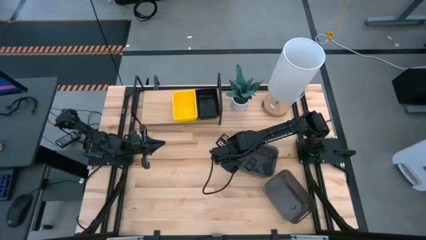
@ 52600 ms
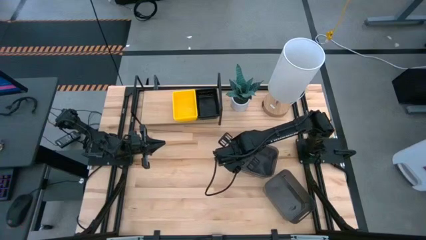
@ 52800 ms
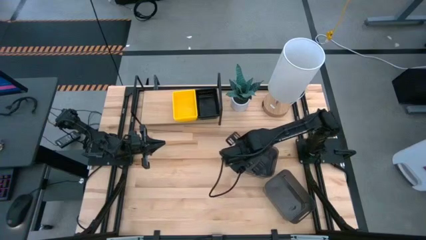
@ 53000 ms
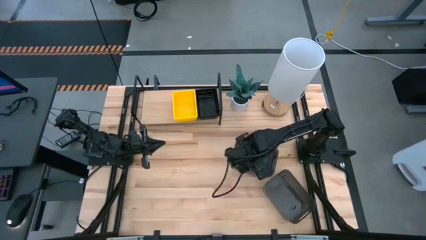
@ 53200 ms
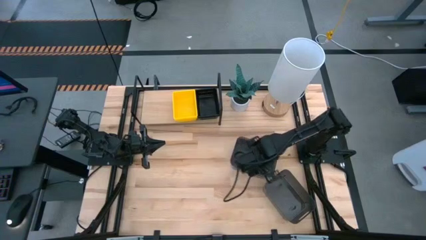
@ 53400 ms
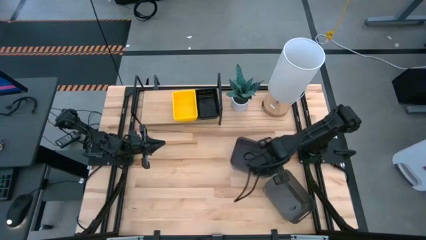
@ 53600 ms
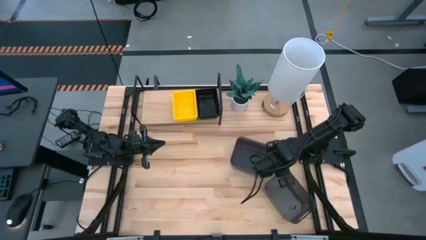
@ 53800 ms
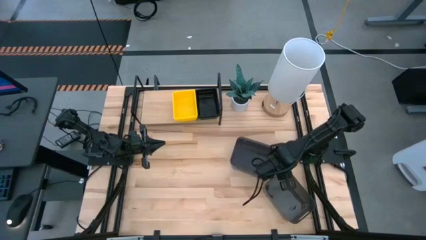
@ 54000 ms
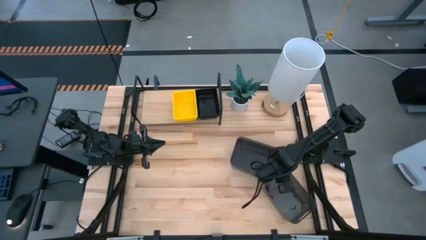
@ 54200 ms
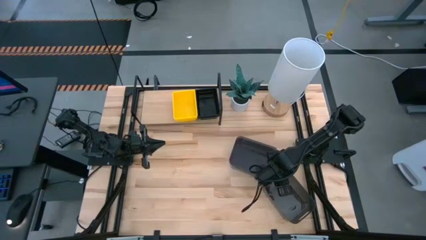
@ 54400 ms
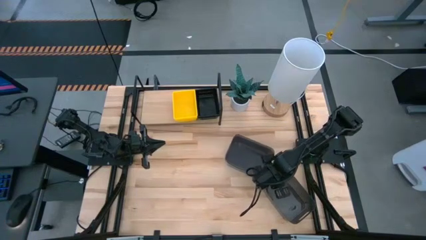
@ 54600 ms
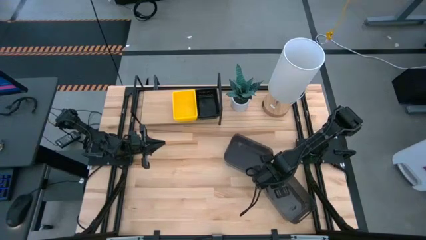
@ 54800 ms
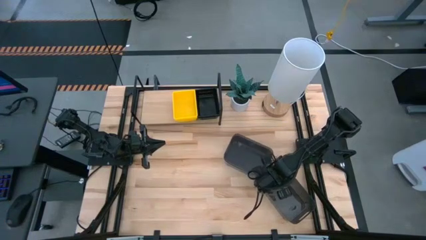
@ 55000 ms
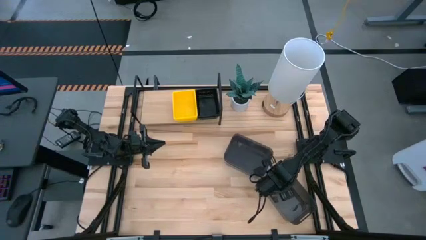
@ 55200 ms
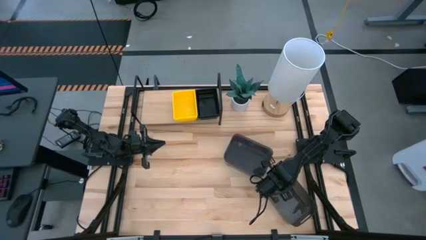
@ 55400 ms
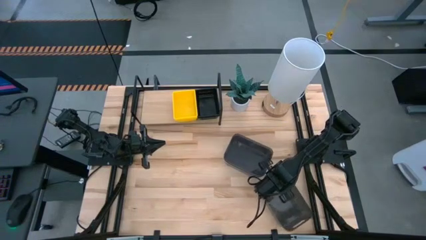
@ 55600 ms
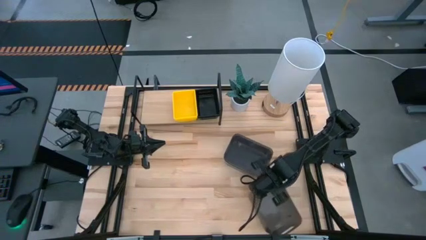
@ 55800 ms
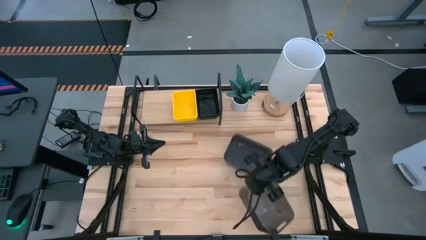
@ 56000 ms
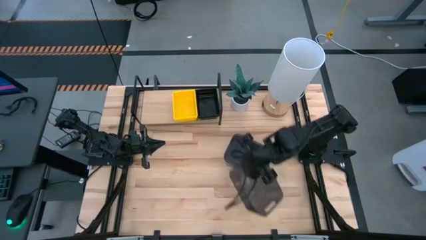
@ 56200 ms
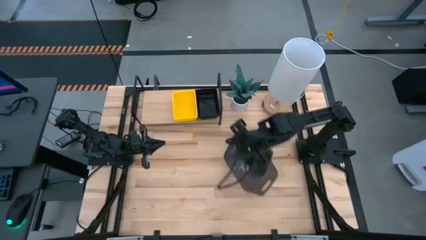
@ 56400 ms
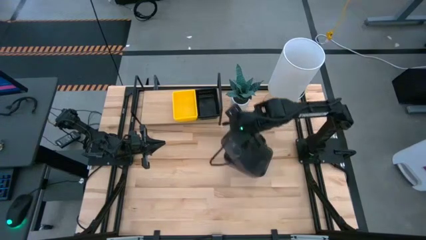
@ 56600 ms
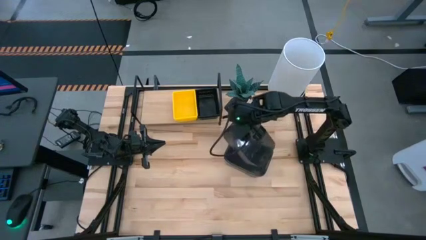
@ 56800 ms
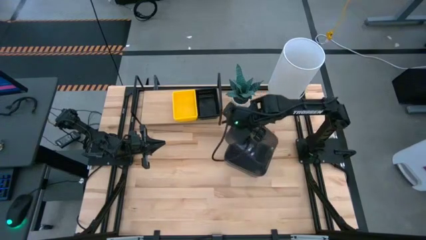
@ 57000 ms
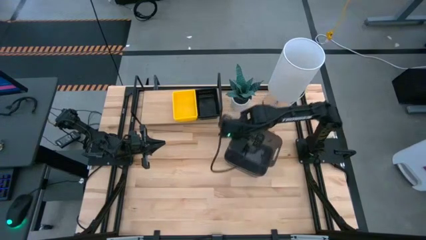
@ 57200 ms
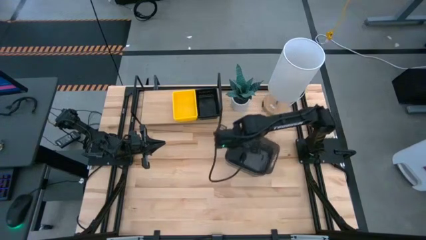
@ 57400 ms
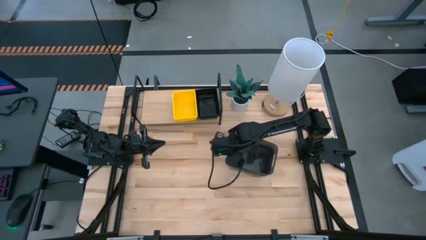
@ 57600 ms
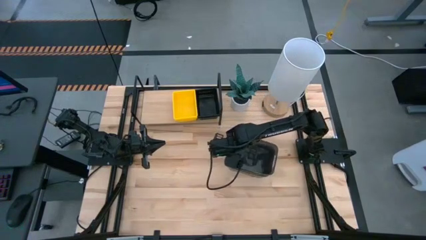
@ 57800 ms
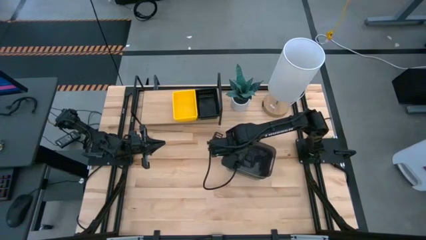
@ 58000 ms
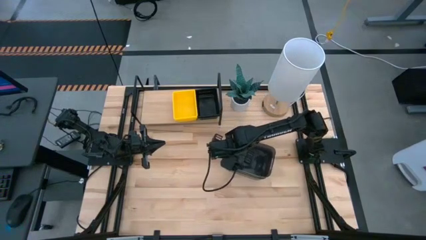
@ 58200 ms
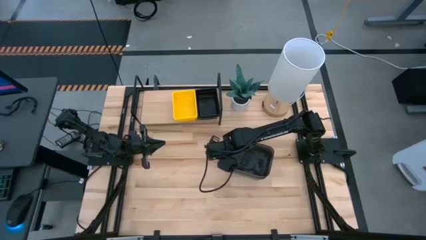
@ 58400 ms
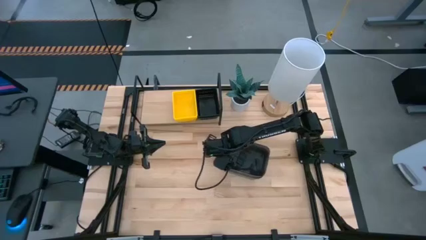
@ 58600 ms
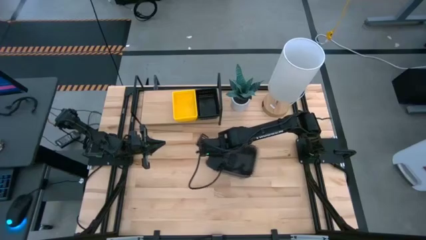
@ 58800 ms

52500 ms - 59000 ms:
Task: Stack baskets on shelf by color
Stack the bottom right black bin on top of the top black bin

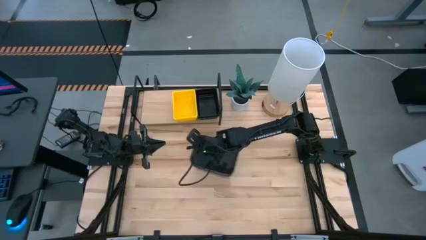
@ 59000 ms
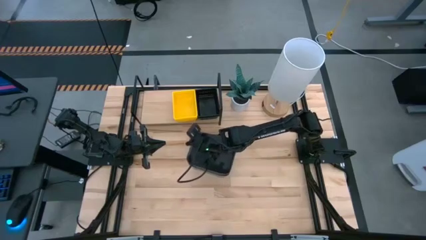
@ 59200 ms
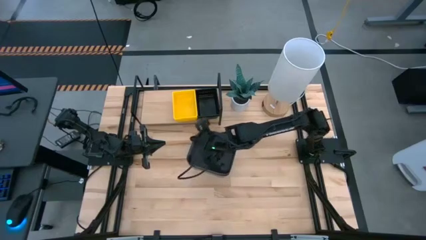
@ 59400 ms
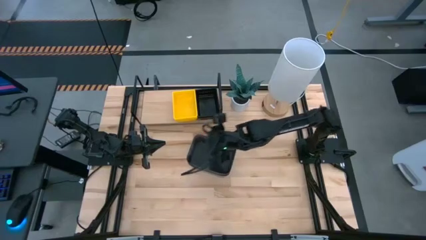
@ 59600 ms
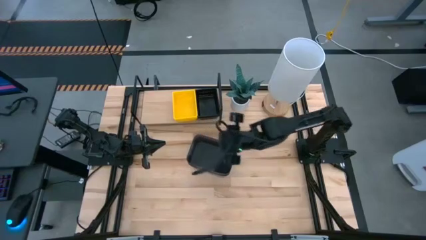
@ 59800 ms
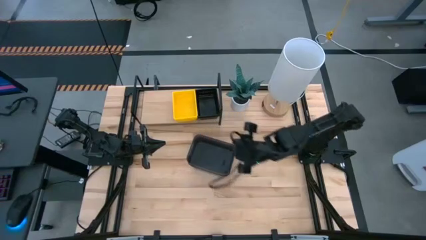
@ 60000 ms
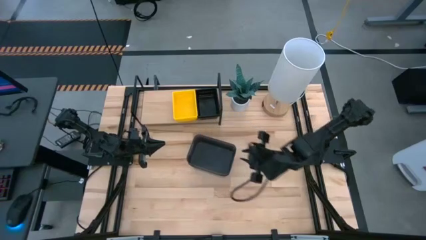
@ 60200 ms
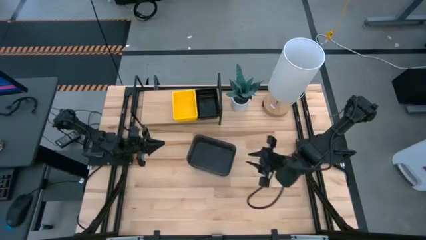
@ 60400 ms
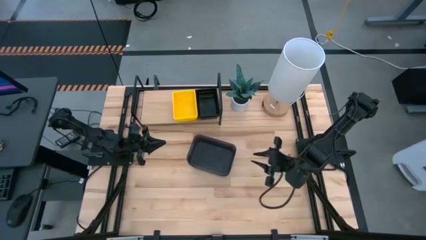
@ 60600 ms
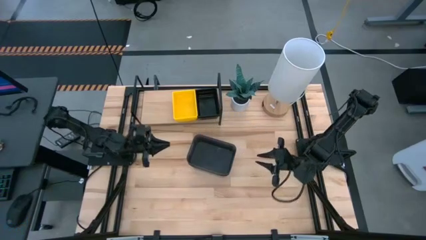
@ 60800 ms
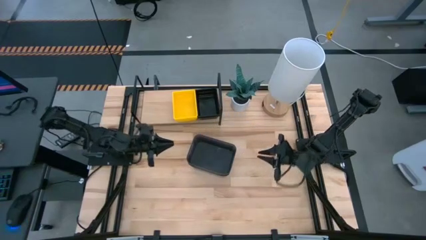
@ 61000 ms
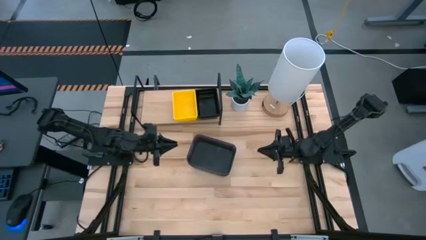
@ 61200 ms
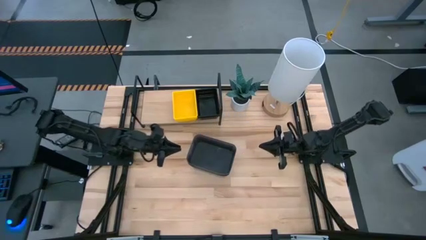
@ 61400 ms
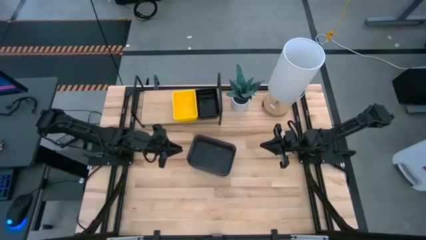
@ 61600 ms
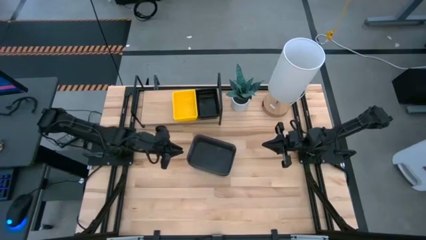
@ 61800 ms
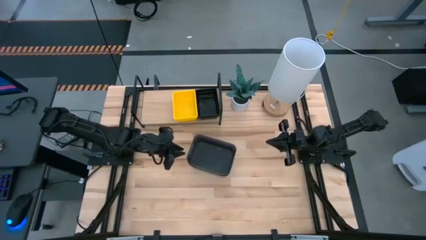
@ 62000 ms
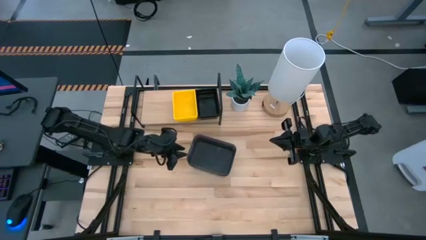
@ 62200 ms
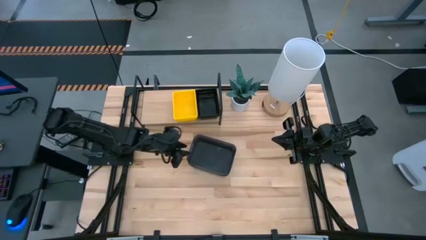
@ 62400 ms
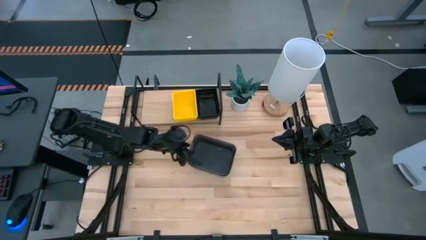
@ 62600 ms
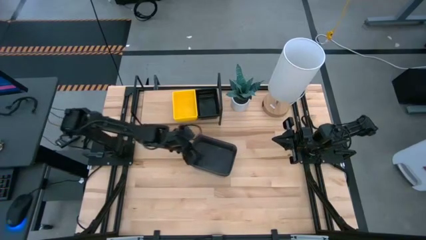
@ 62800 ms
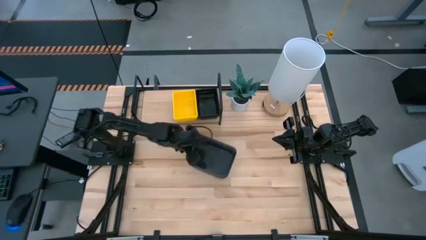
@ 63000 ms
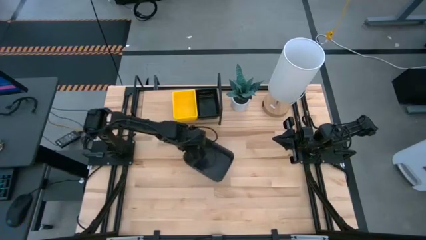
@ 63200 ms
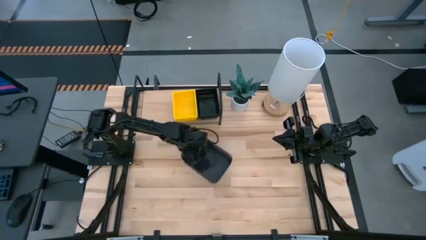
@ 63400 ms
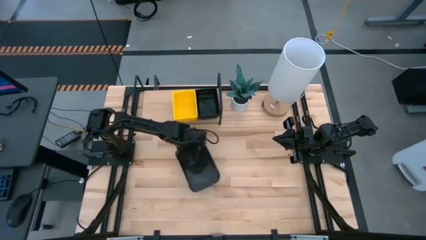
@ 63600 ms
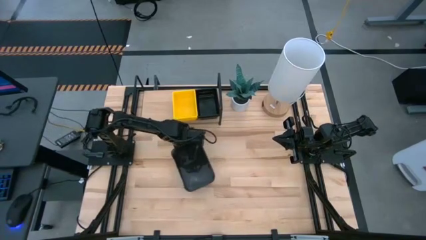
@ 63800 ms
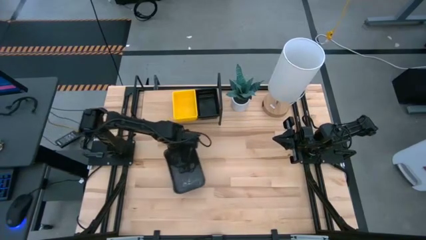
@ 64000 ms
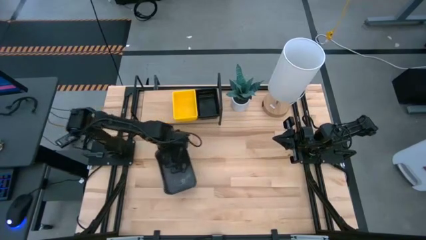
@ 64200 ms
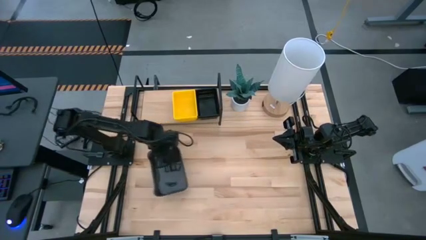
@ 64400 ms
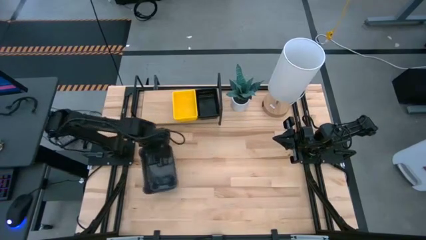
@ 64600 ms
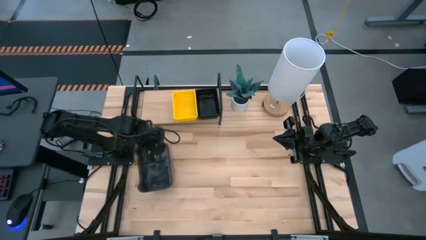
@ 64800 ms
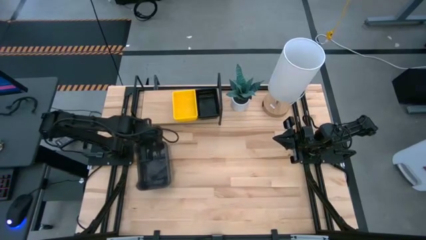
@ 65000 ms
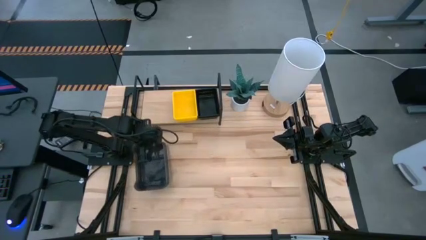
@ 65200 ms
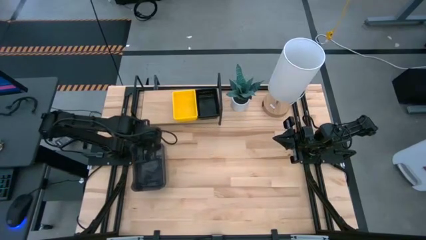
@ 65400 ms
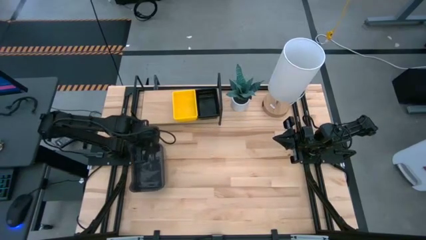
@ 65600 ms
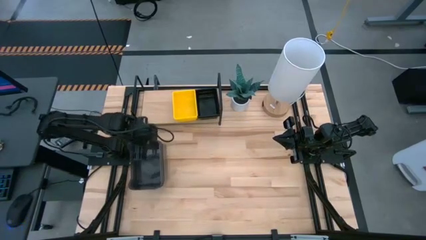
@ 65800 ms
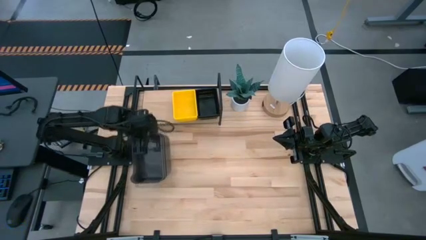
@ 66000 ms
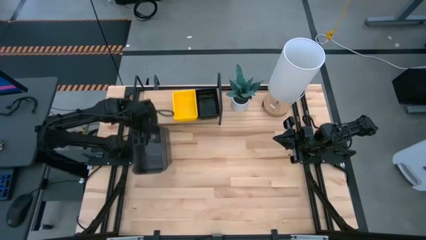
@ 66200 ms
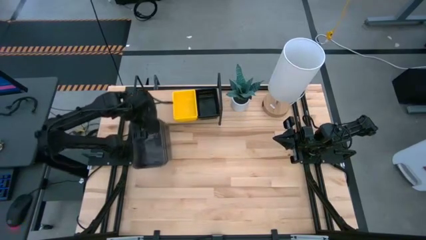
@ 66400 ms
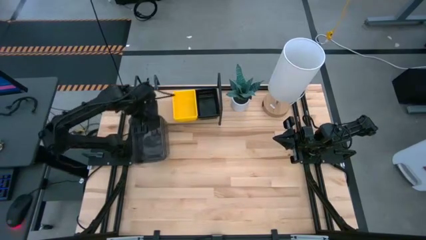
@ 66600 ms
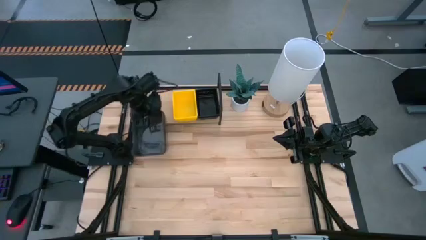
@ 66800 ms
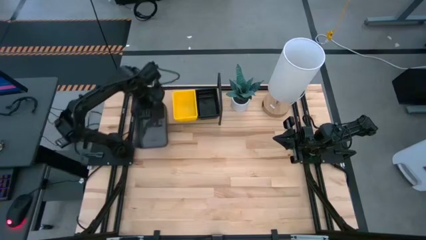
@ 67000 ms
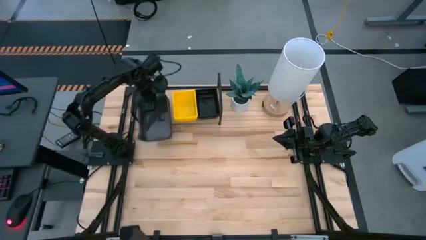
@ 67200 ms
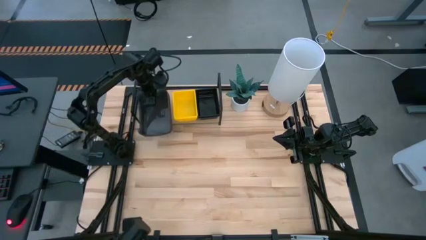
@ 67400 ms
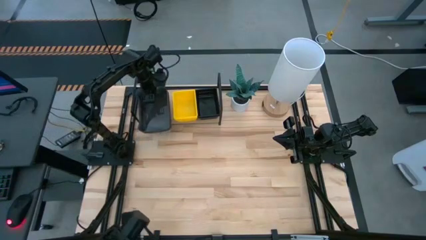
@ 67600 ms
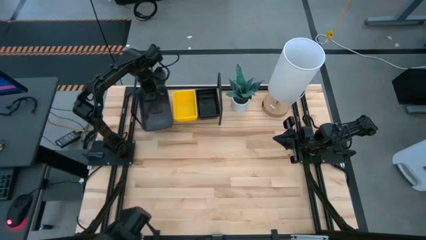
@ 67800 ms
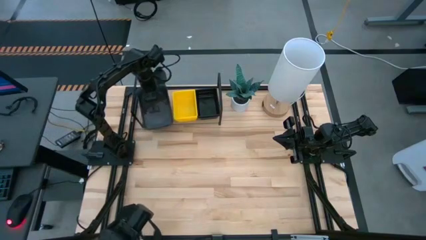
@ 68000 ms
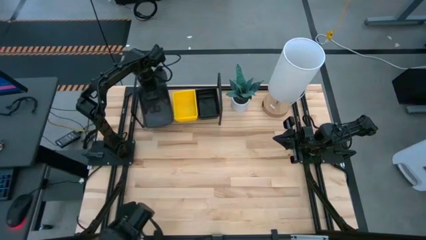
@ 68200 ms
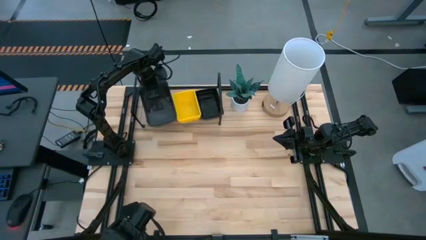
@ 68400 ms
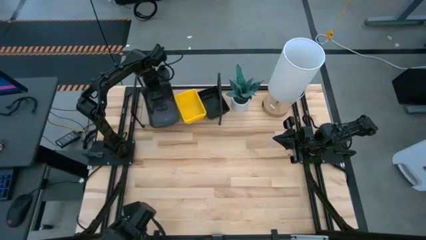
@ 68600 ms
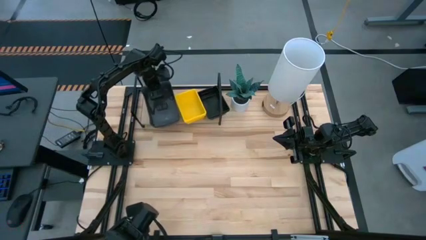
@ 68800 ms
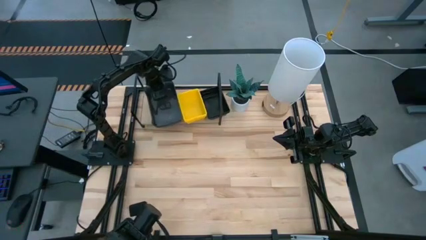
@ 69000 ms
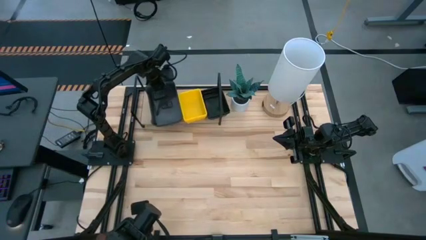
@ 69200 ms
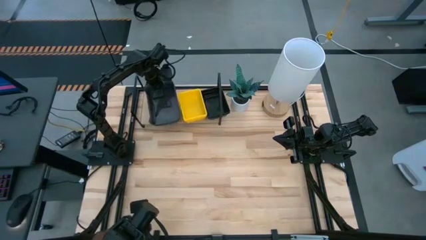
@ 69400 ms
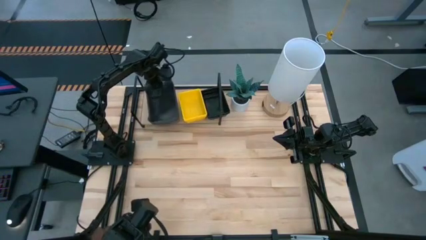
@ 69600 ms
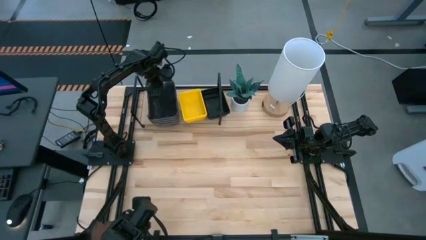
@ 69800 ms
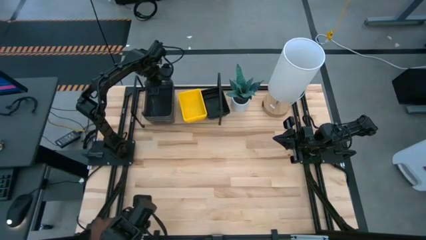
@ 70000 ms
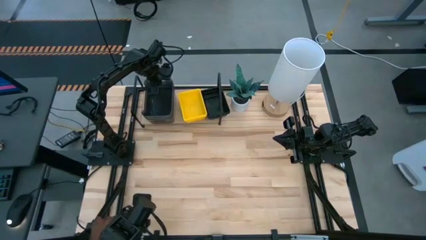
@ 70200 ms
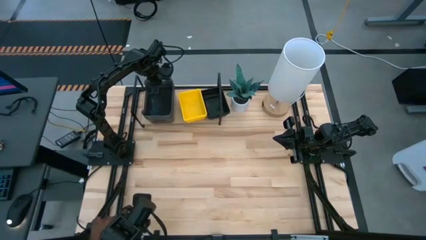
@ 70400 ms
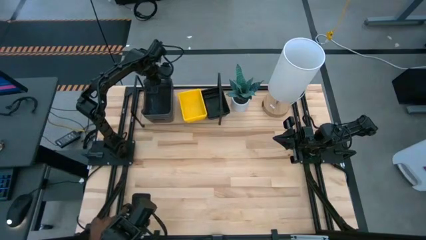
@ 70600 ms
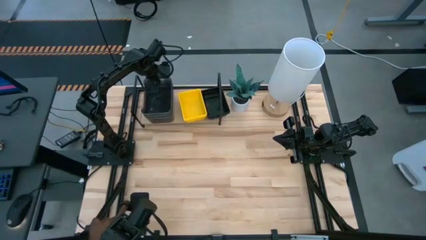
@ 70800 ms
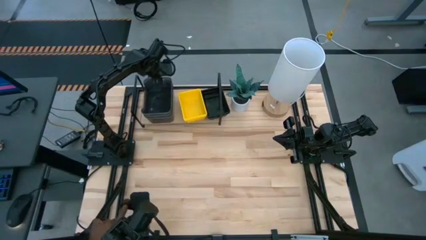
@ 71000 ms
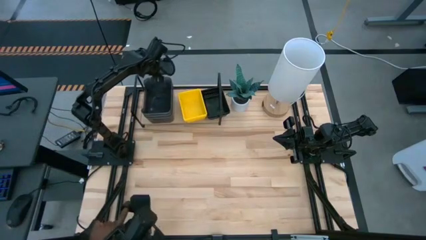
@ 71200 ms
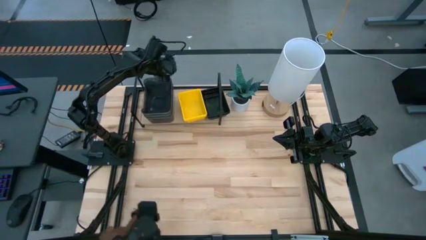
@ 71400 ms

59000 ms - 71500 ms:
Put the stacked black bins on the shelf
